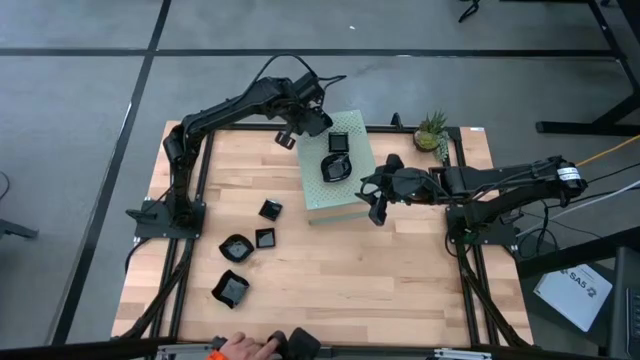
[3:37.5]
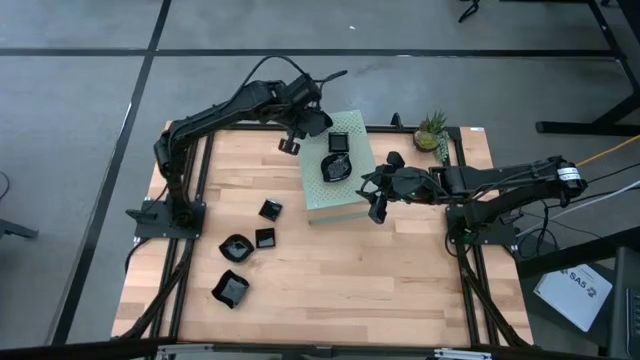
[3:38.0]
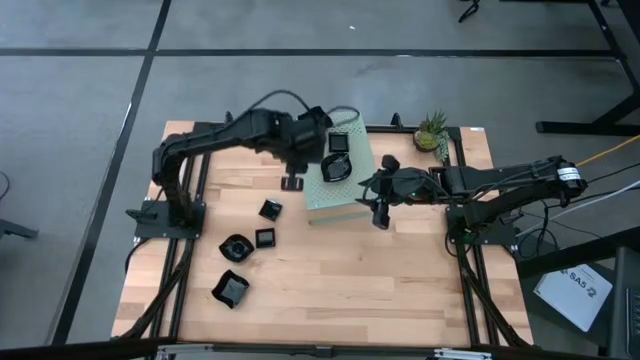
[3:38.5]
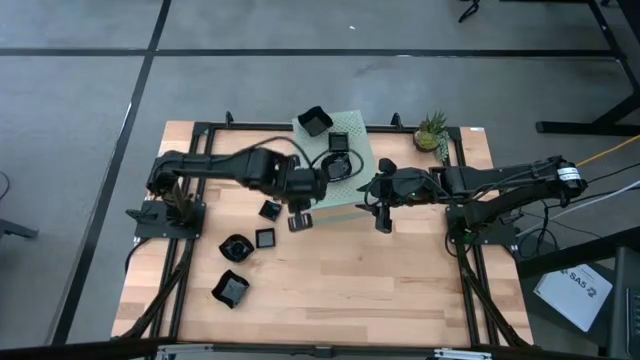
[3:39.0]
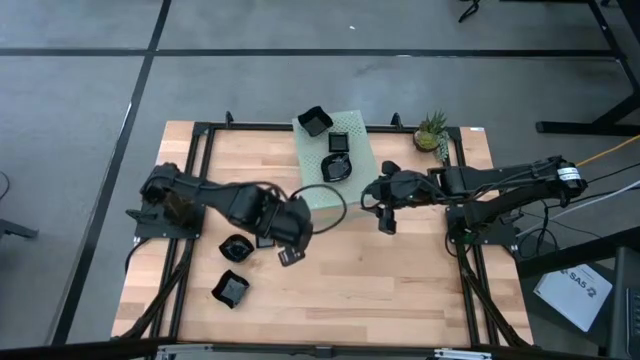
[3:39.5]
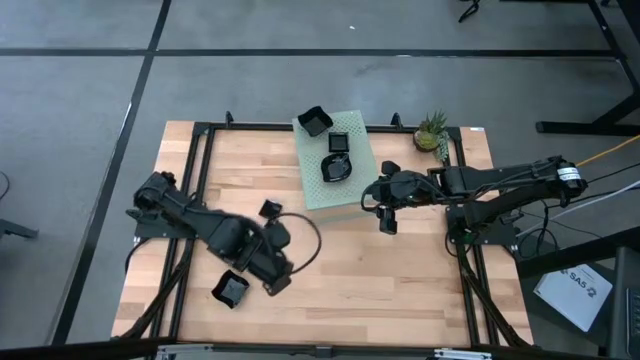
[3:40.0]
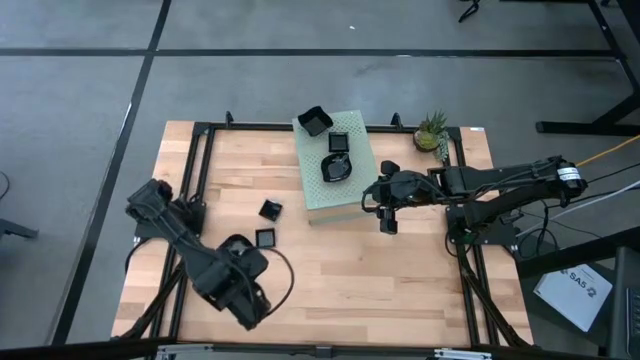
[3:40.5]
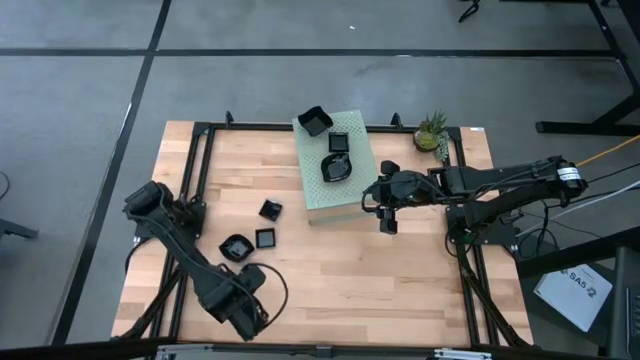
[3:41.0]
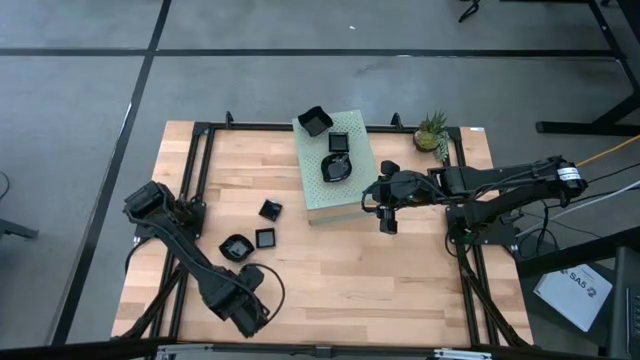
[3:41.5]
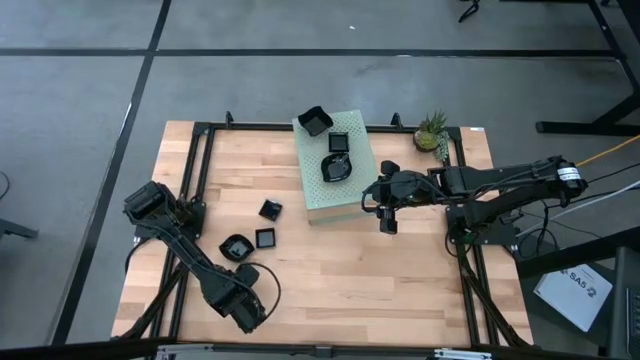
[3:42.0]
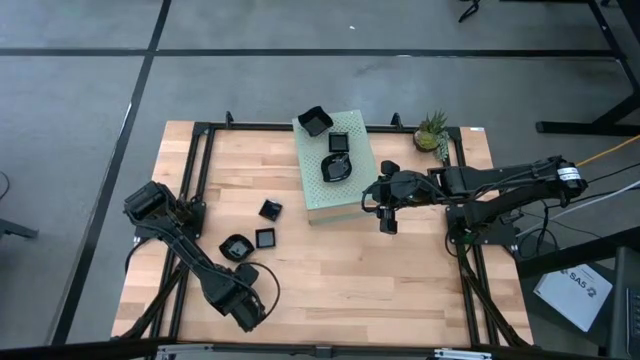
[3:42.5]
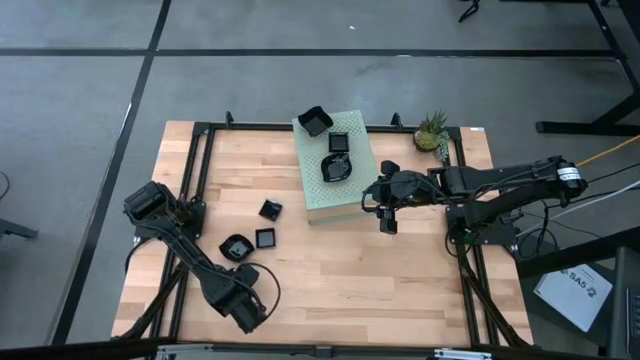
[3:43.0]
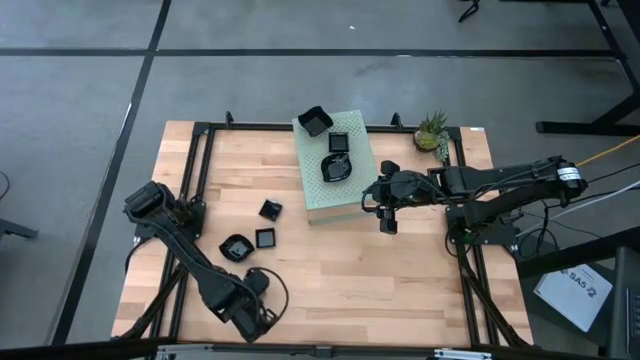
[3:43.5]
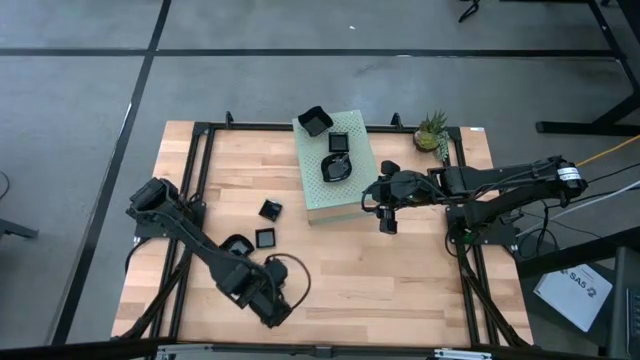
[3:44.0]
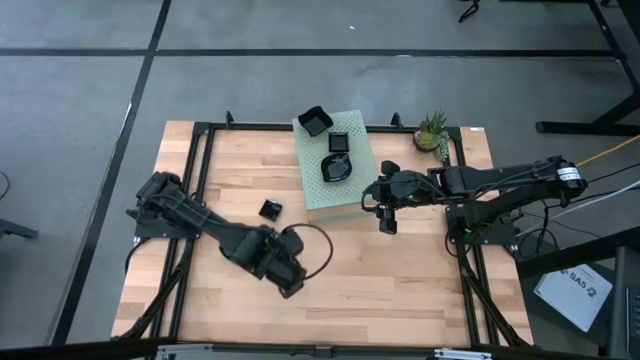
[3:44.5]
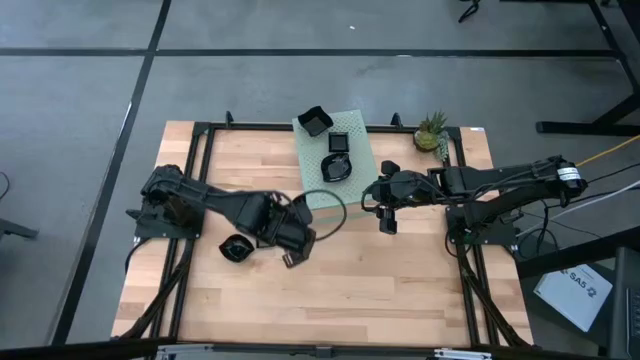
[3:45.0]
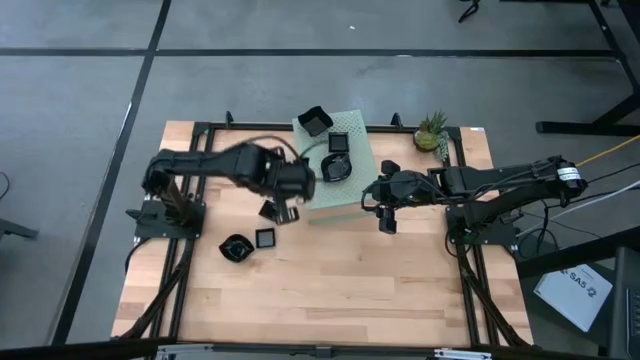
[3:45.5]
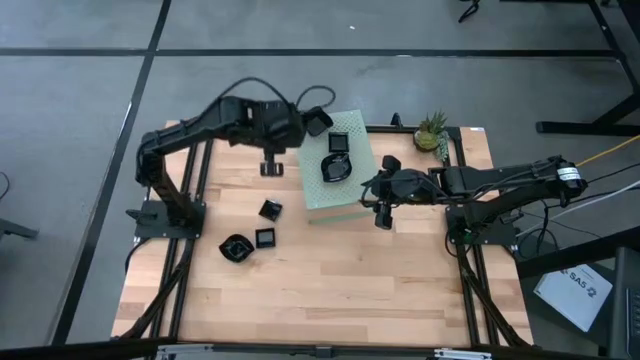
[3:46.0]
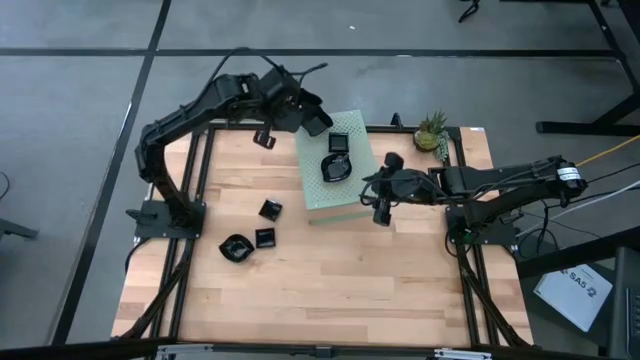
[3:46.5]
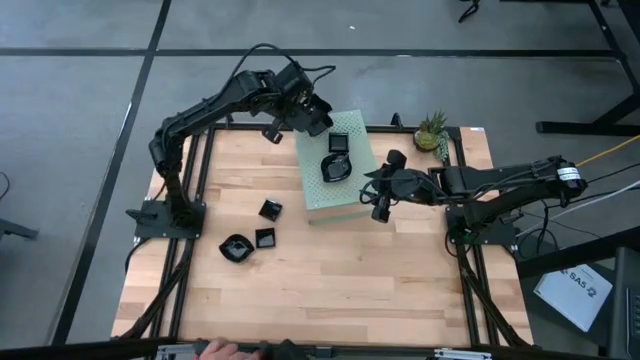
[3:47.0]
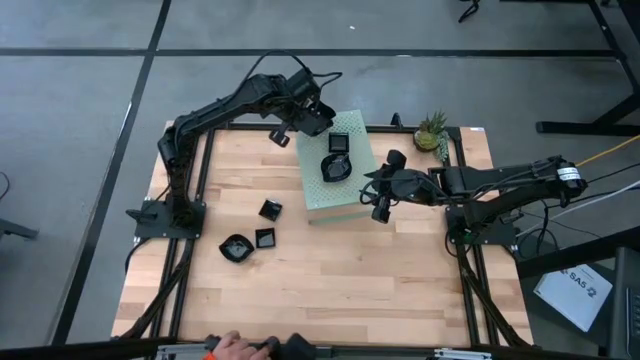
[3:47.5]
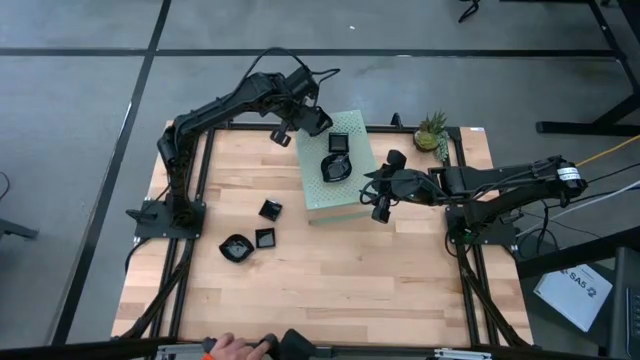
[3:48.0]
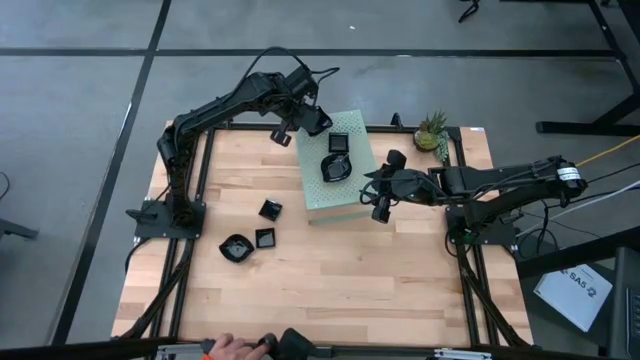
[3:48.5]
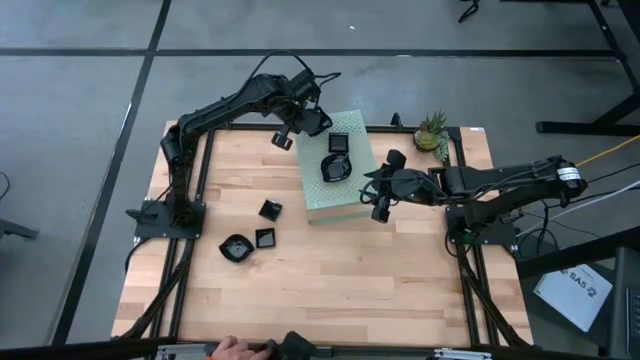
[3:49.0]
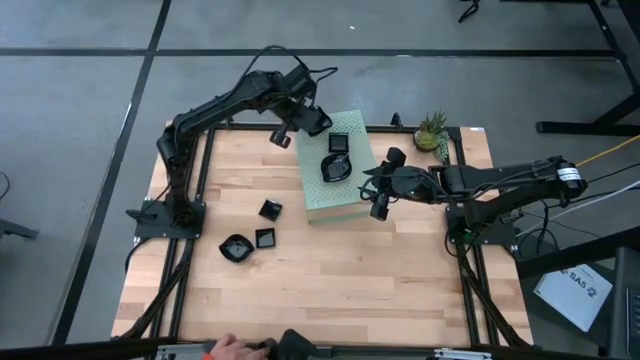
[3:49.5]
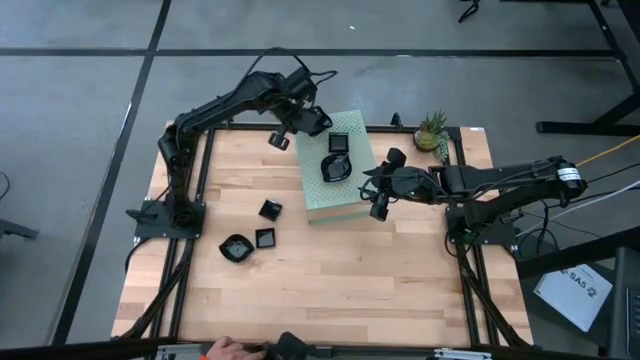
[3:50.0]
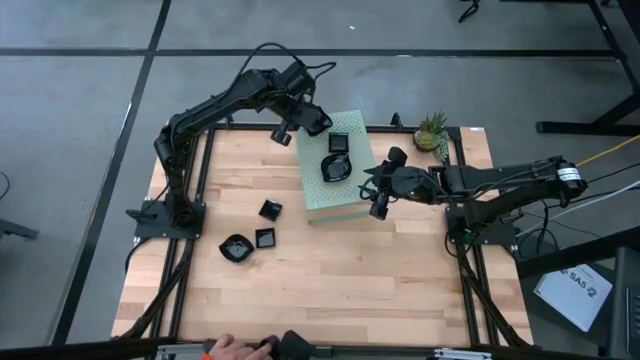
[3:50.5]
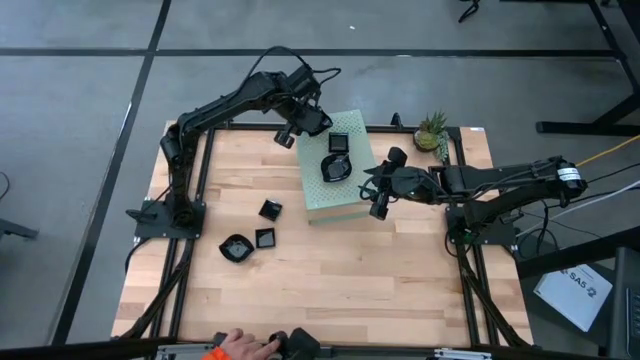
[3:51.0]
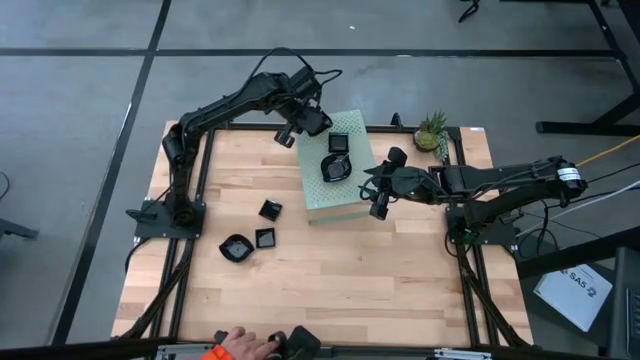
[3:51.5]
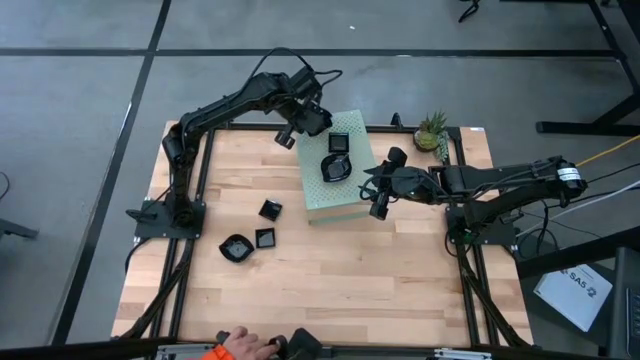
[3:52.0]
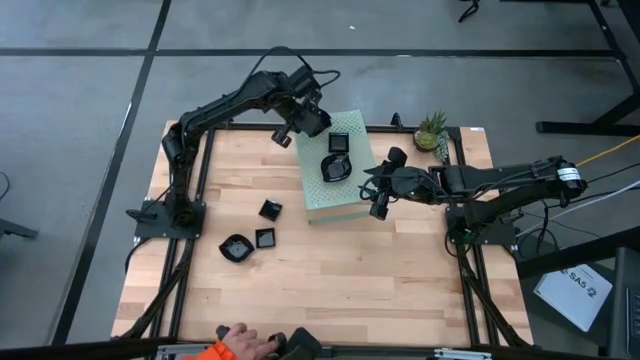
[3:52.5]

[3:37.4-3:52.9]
Task: Pick & Place Mini shaped plates
Stack the black distorted square plate on top of the black distorted square plates on the shelf

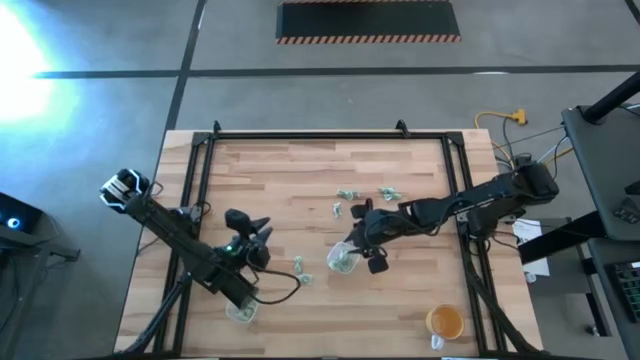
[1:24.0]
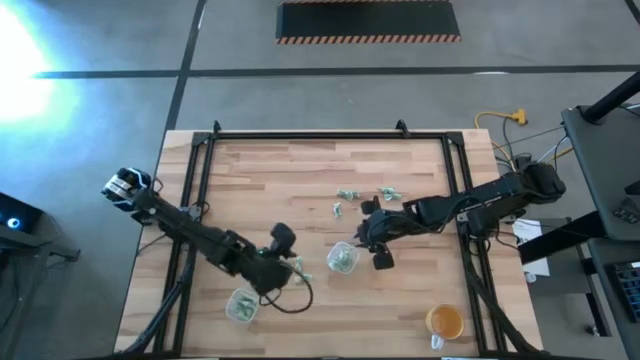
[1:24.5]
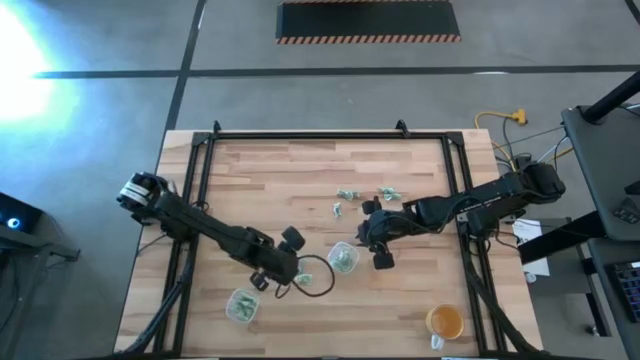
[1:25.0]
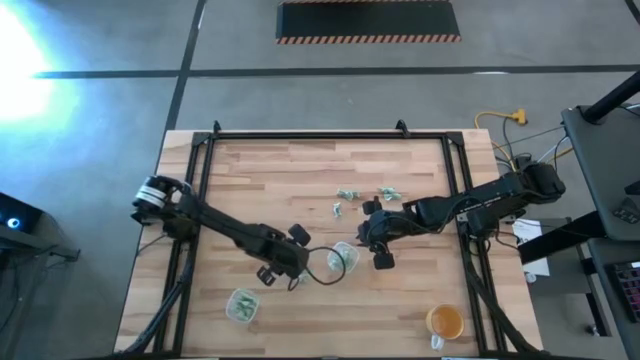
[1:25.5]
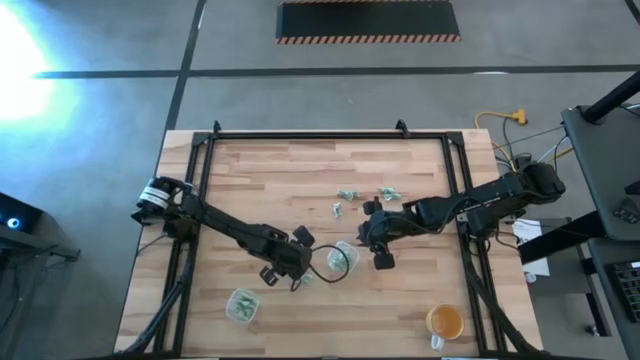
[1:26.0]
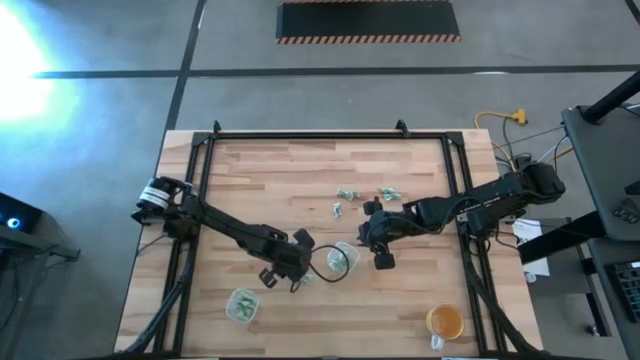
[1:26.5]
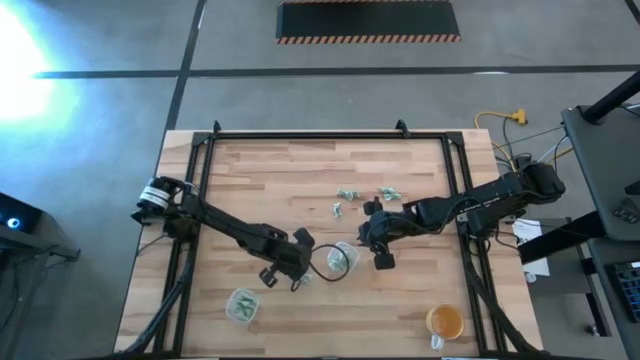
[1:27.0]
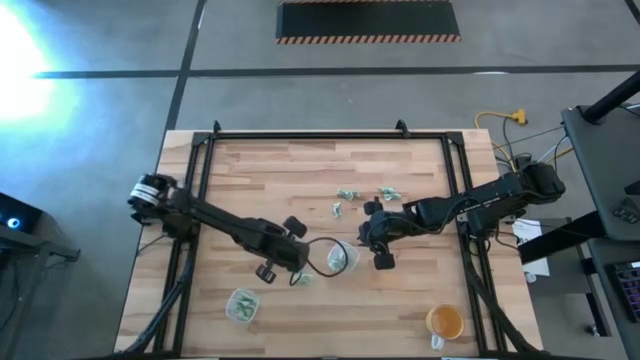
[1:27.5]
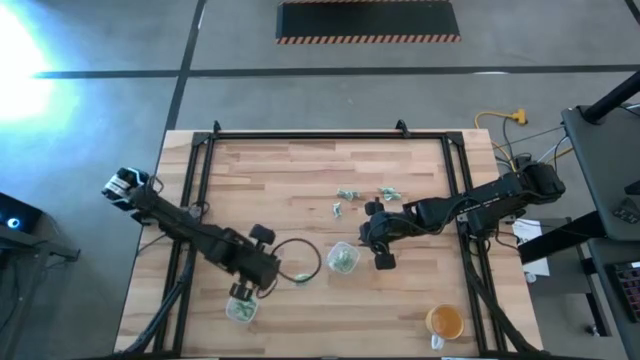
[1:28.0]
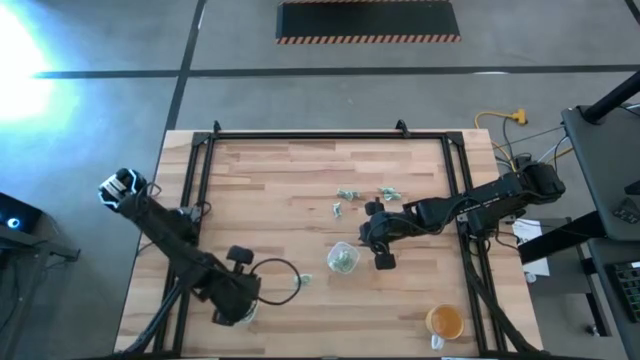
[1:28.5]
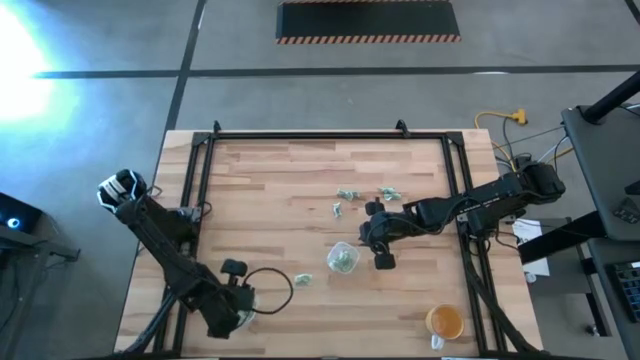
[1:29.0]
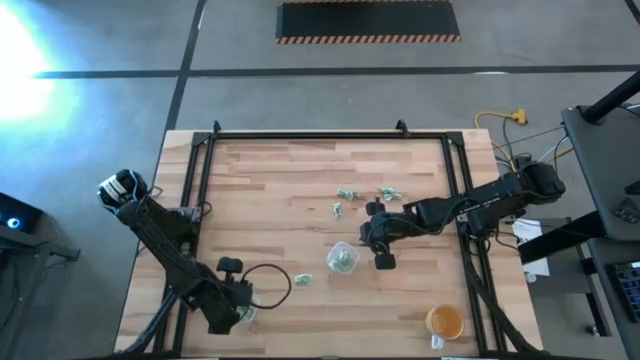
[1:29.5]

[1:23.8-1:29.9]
Task: Pick and place items into bin
Put the sugar packet into the bottom transparent bin
